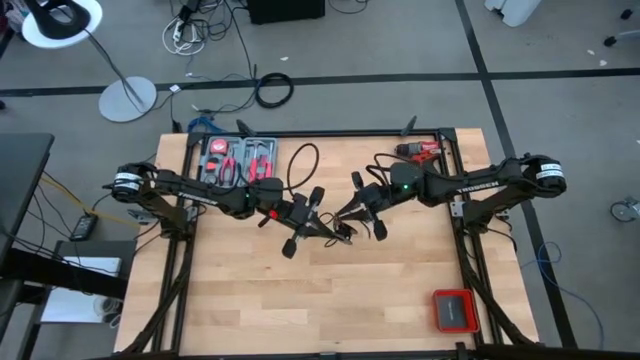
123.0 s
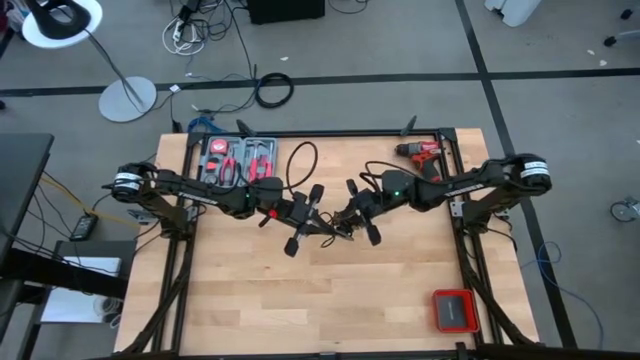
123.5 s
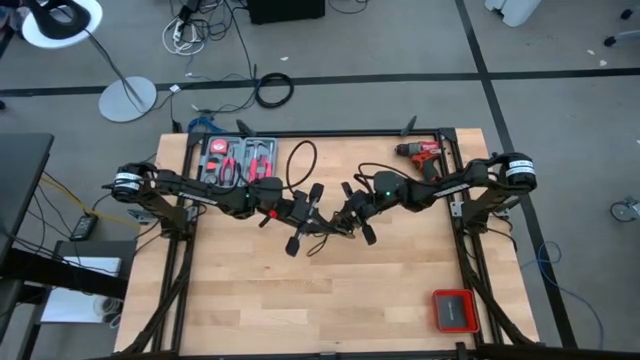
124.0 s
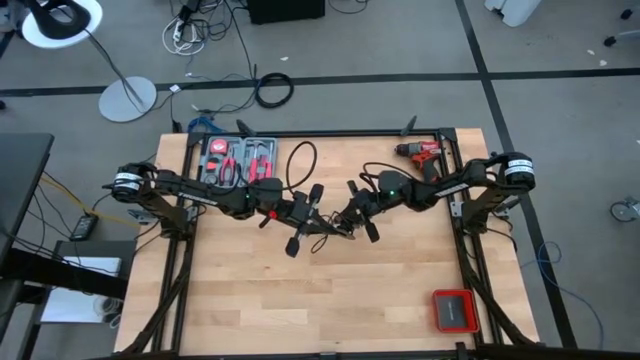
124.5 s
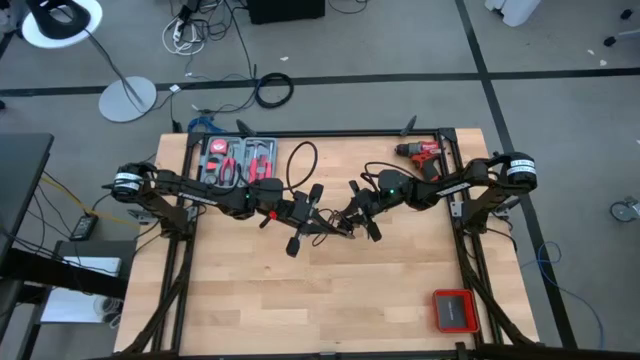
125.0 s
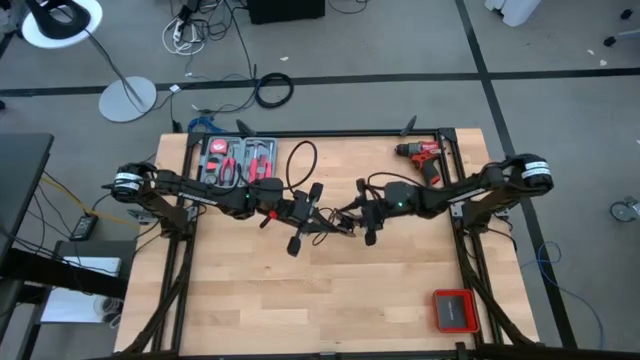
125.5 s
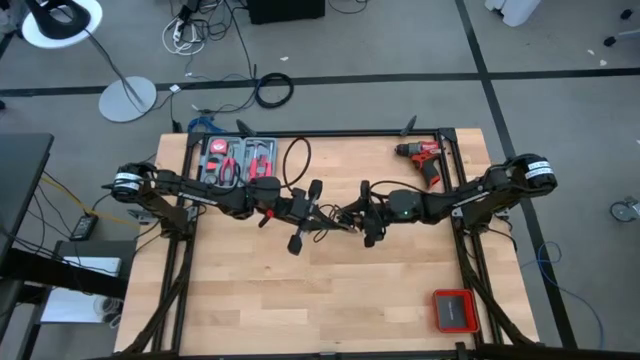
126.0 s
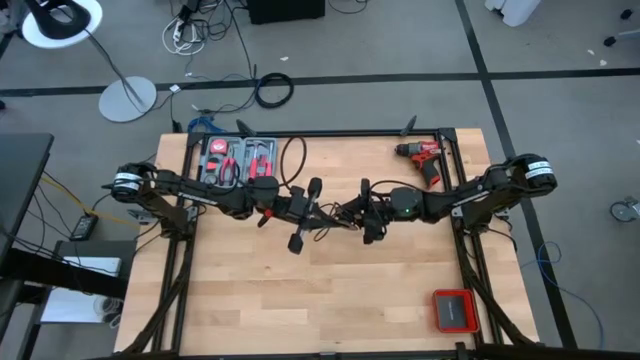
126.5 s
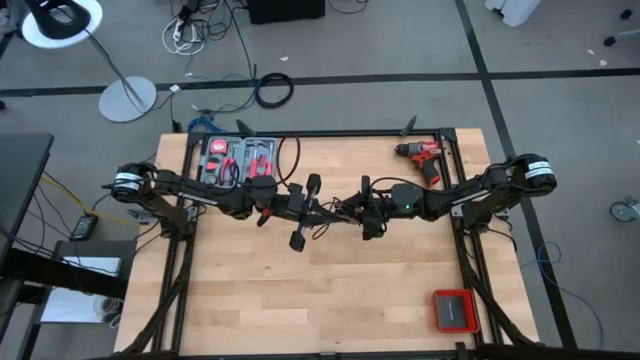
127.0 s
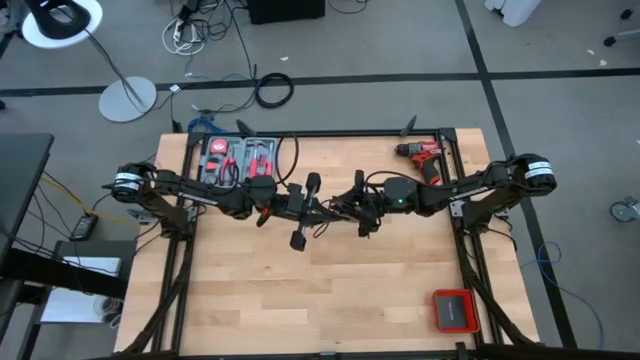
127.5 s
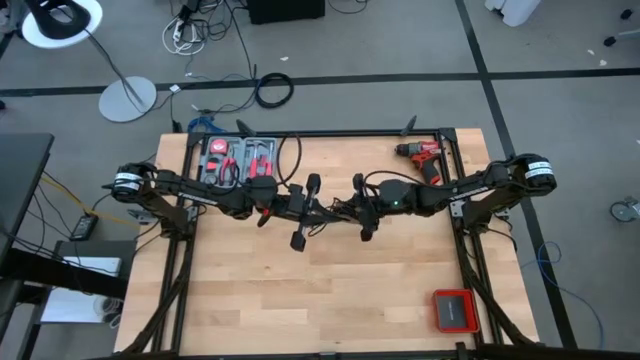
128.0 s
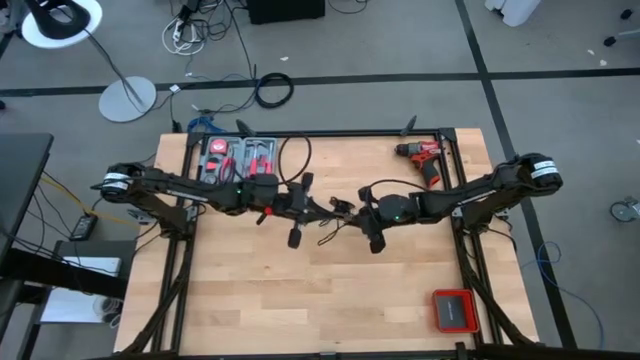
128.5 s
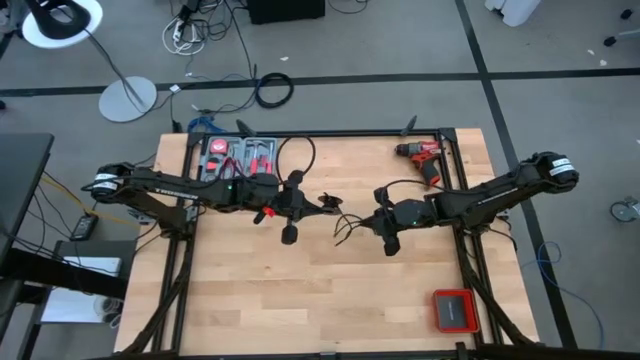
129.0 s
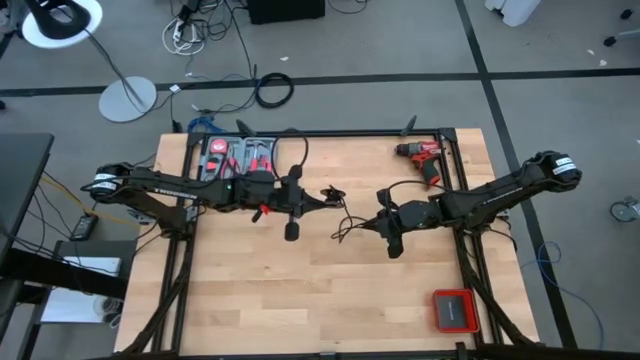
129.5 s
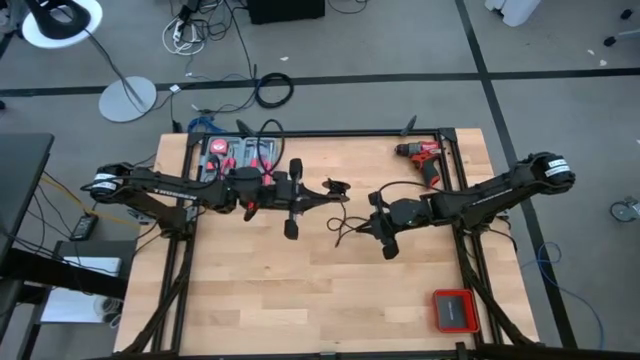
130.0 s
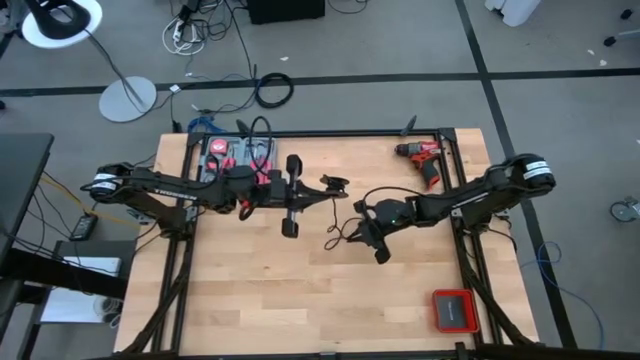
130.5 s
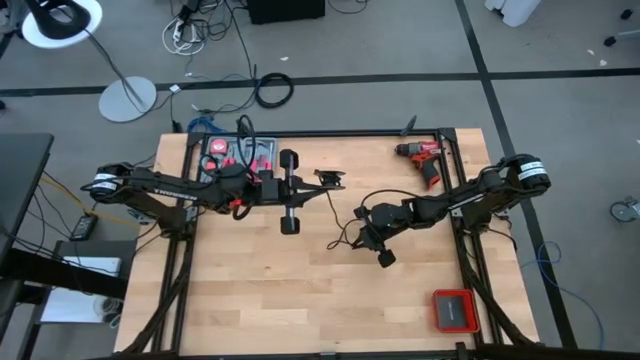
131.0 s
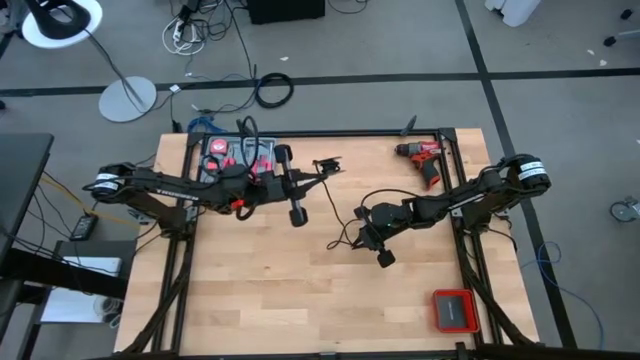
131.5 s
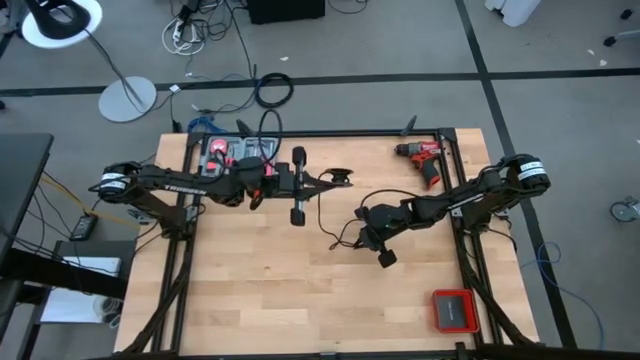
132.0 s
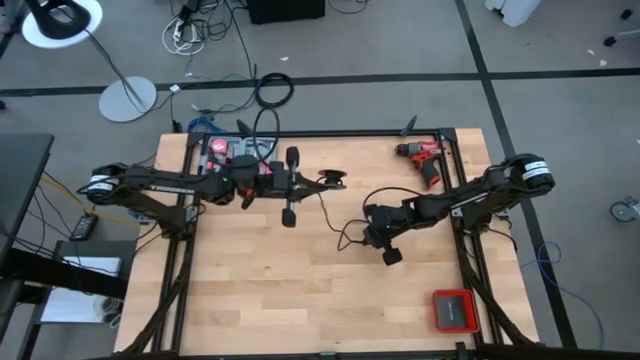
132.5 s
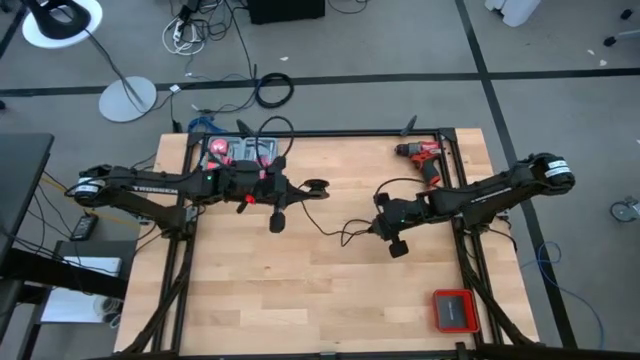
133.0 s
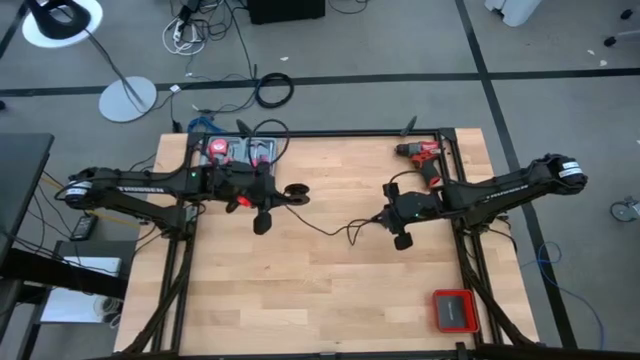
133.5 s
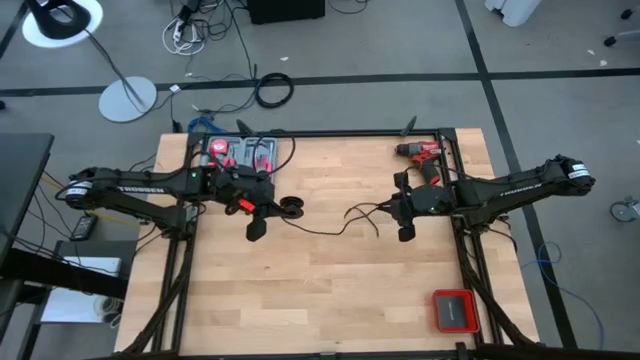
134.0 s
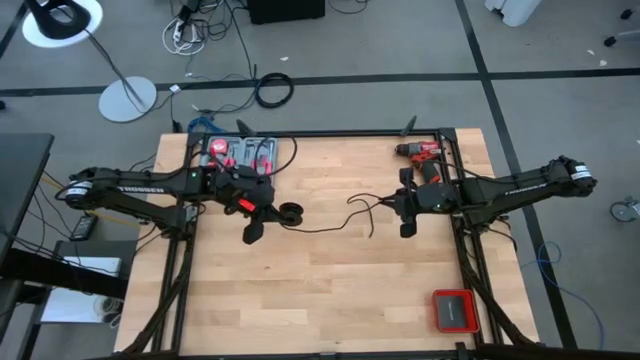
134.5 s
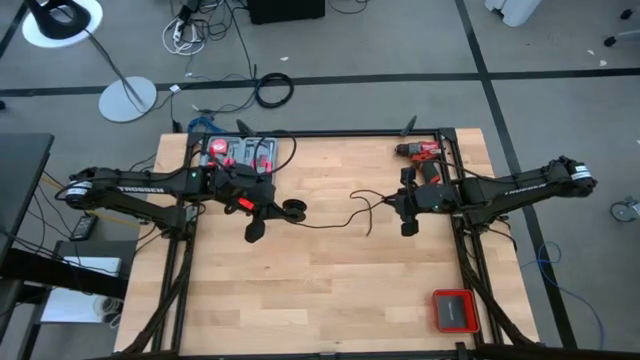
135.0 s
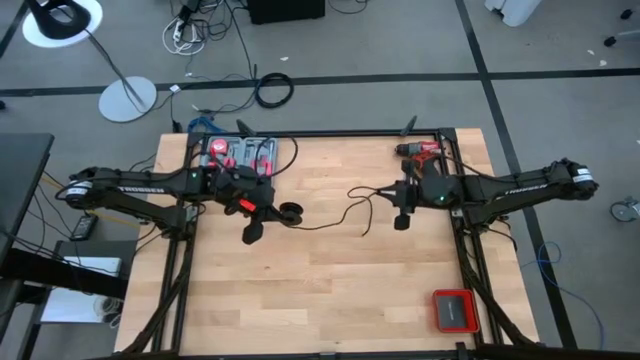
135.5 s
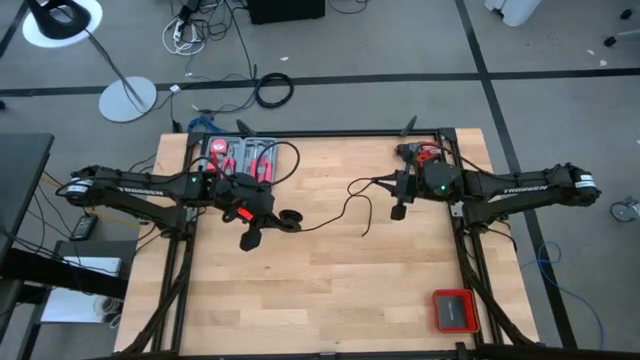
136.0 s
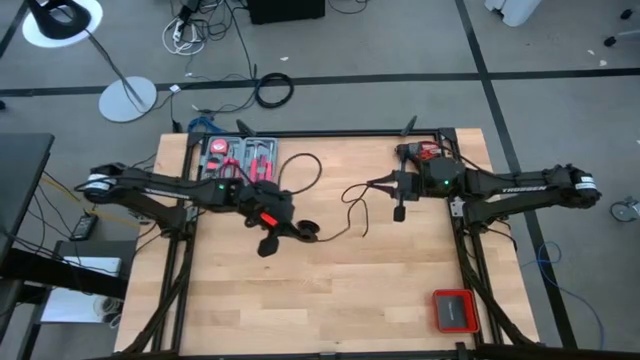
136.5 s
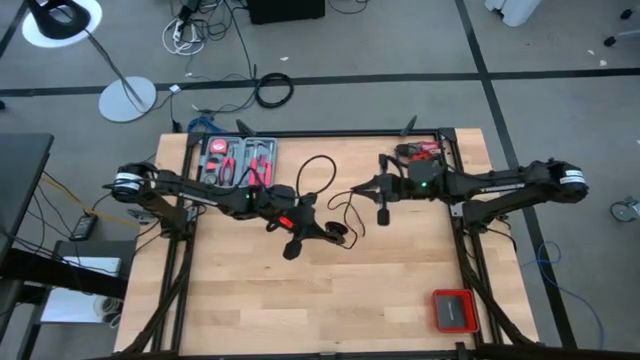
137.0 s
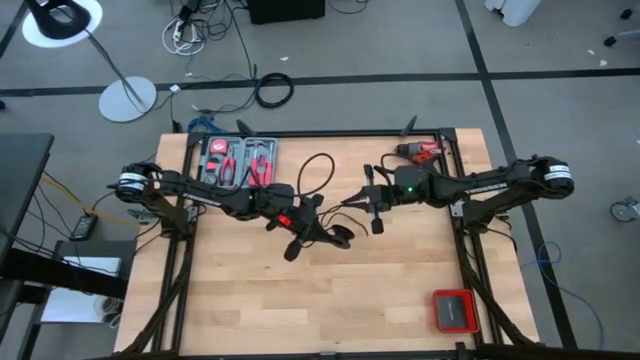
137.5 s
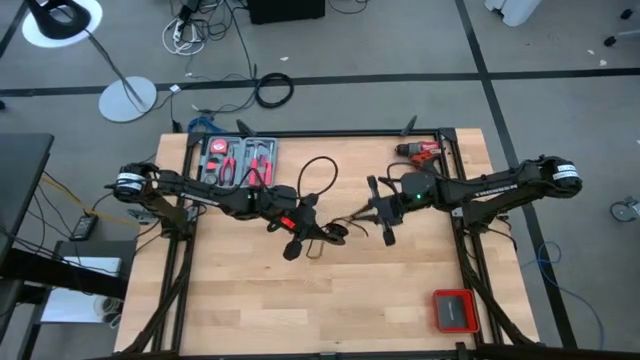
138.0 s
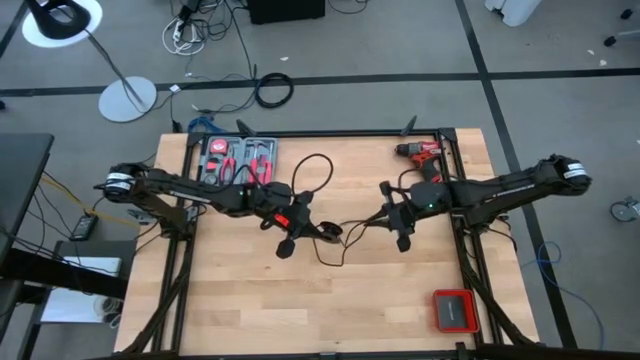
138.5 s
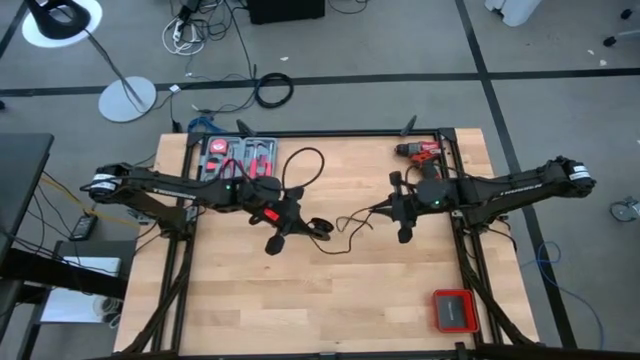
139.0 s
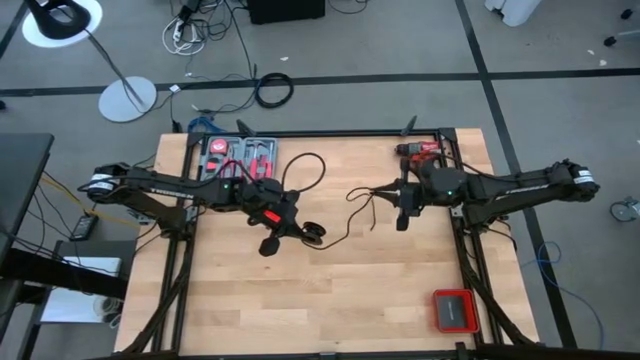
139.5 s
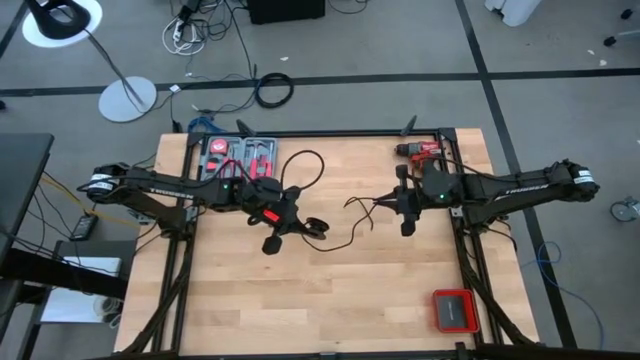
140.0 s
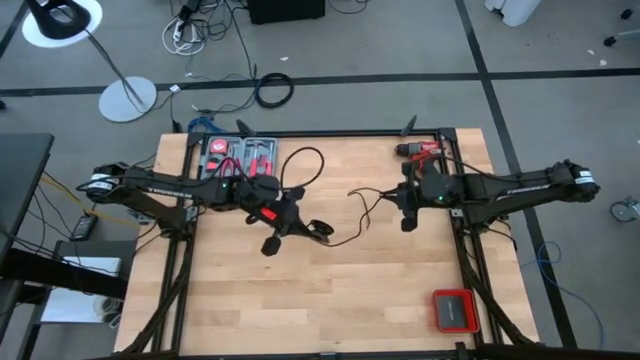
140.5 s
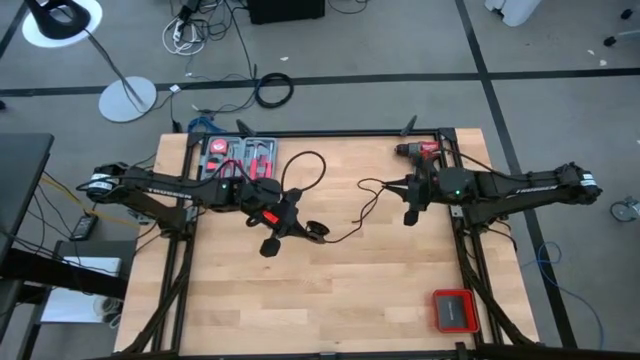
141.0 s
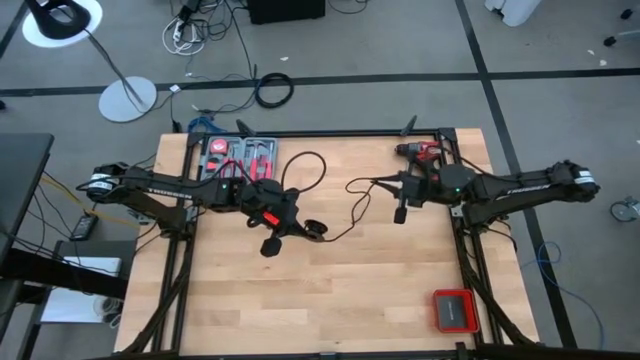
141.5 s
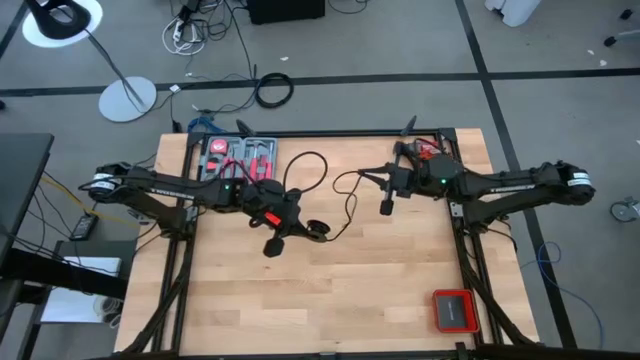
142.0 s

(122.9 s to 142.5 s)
Task: Coil cords
Coil the black wire on the black spool

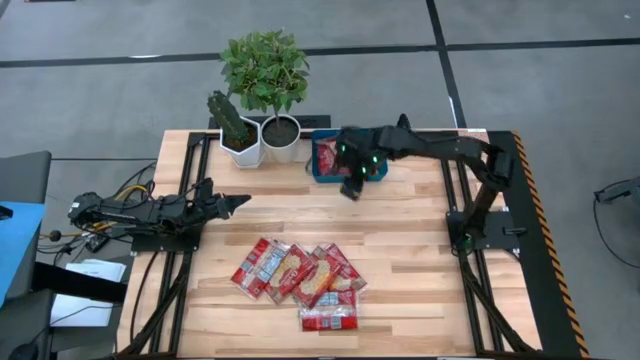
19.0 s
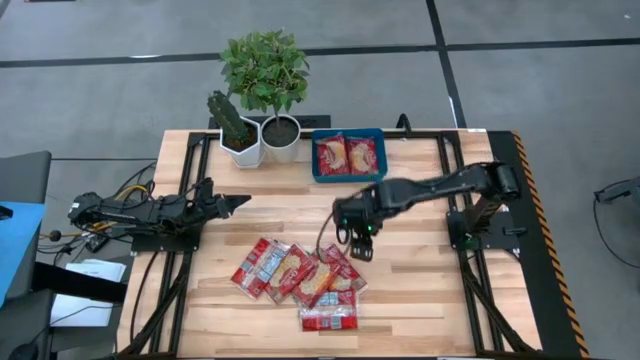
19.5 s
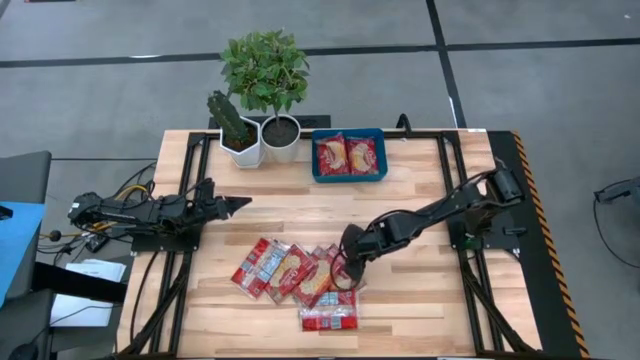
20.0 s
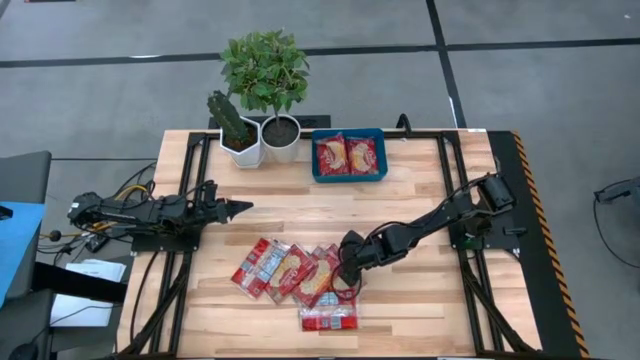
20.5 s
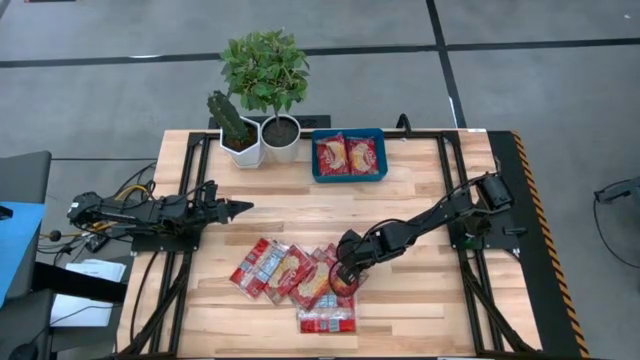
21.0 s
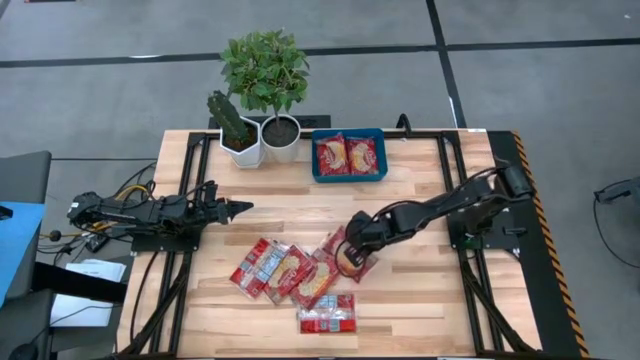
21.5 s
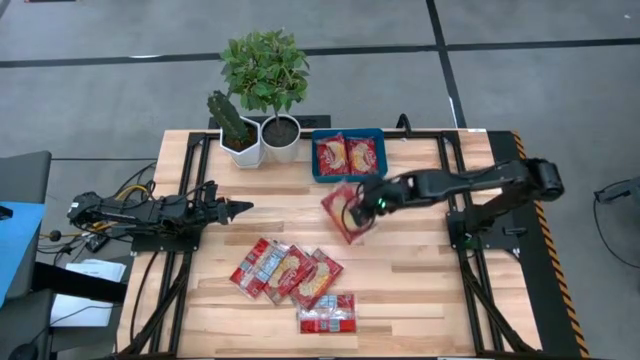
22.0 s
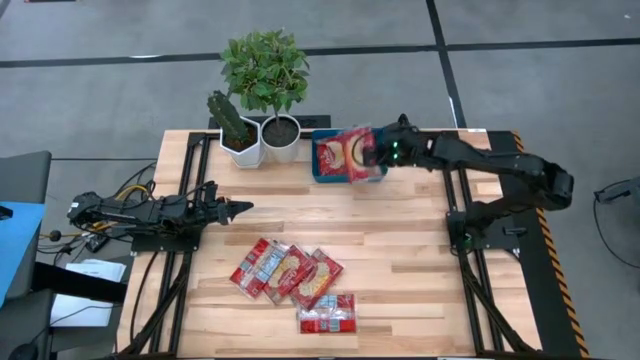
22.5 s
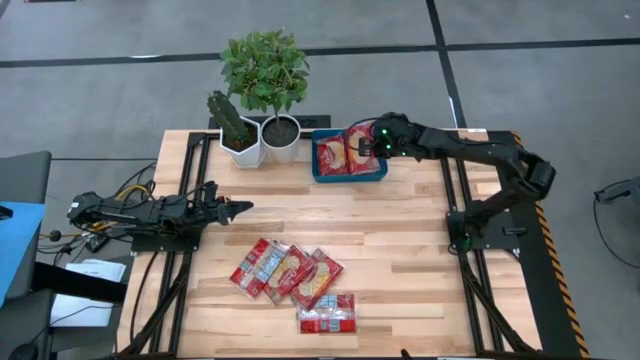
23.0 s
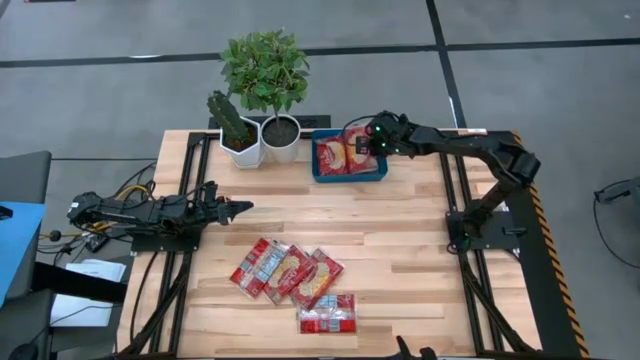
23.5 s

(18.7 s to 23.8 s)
Task: Sort popcorn bags into baskets
Put the red popcorn bag into the blue container
